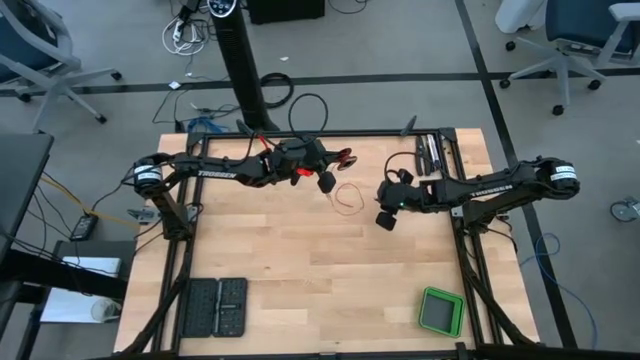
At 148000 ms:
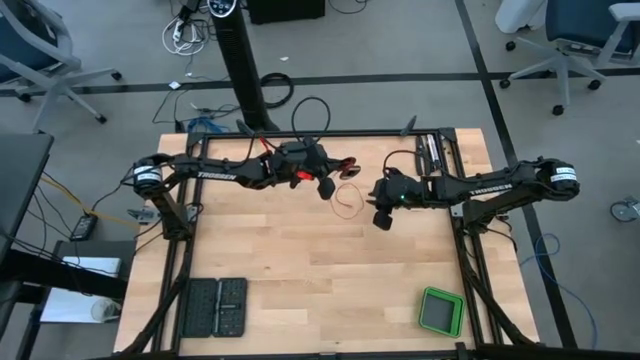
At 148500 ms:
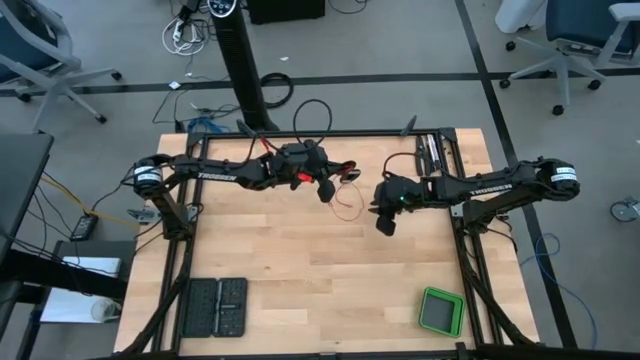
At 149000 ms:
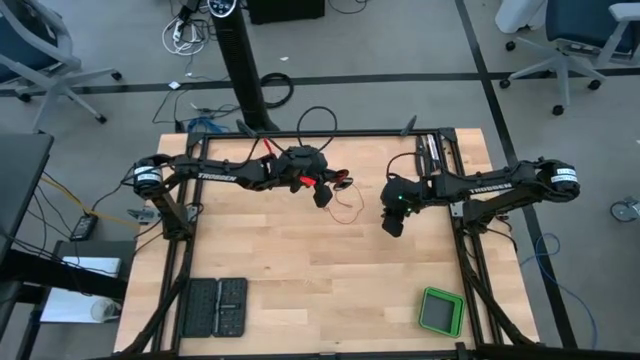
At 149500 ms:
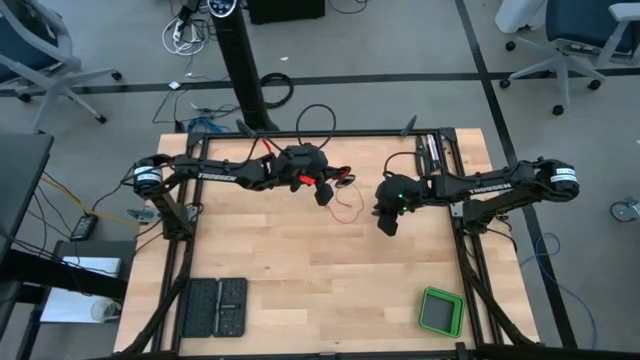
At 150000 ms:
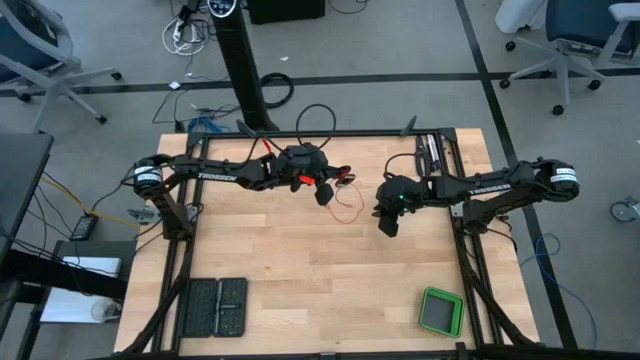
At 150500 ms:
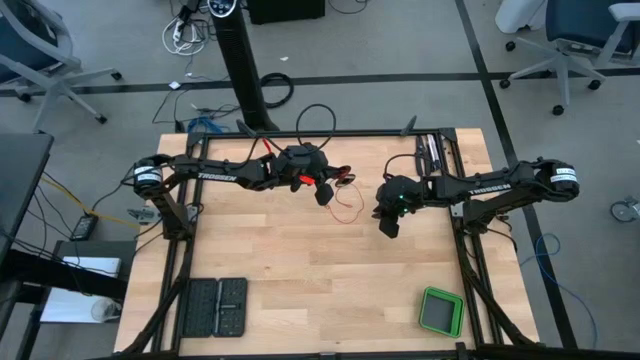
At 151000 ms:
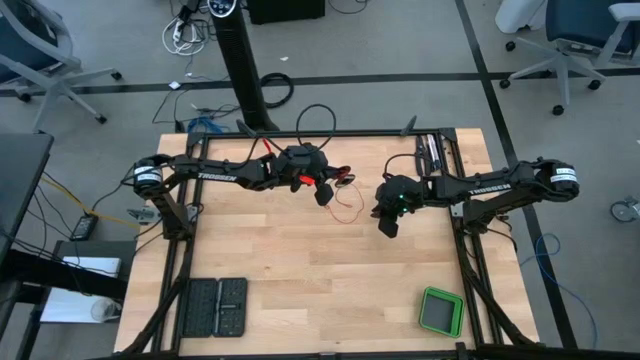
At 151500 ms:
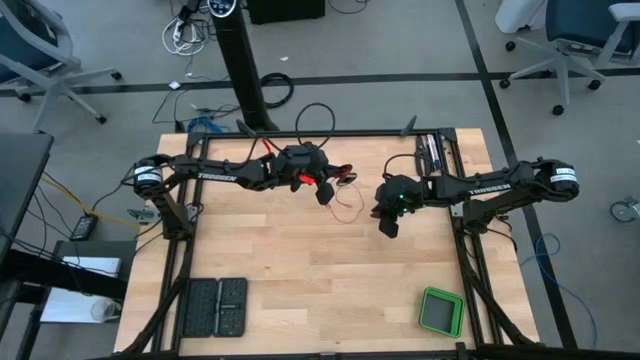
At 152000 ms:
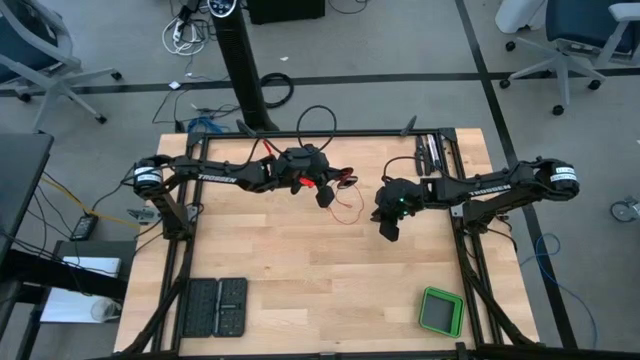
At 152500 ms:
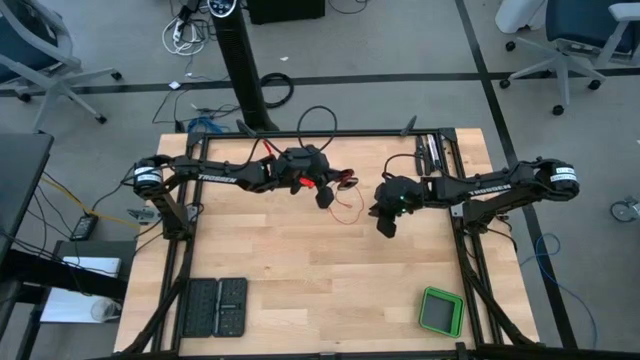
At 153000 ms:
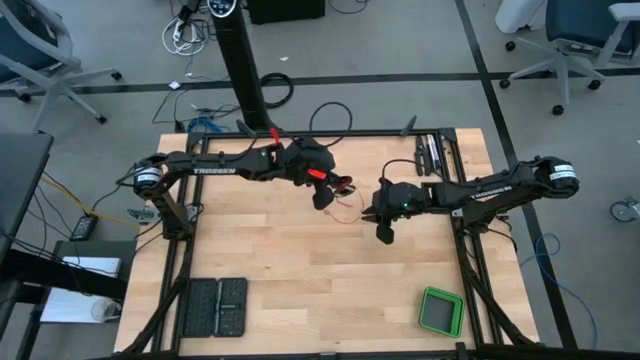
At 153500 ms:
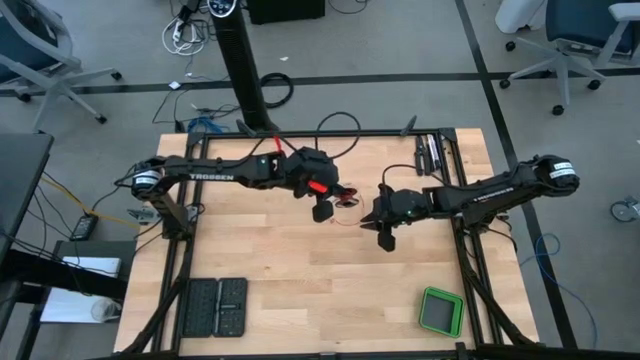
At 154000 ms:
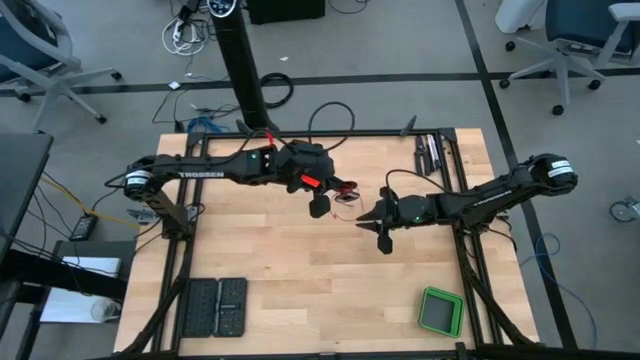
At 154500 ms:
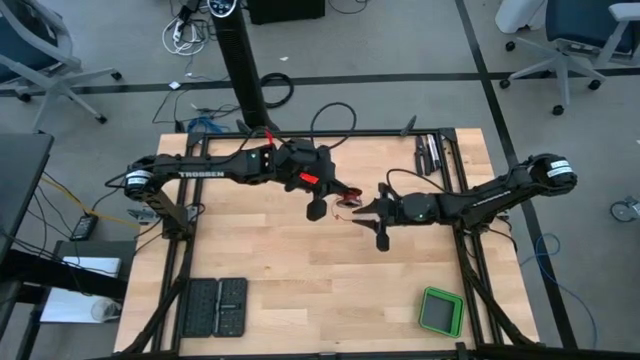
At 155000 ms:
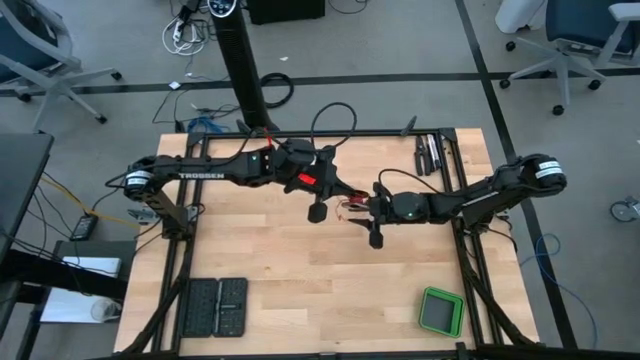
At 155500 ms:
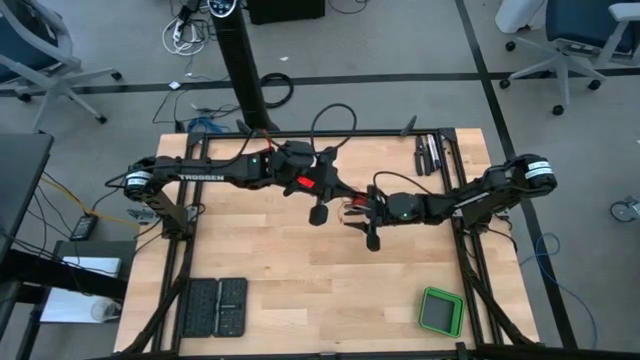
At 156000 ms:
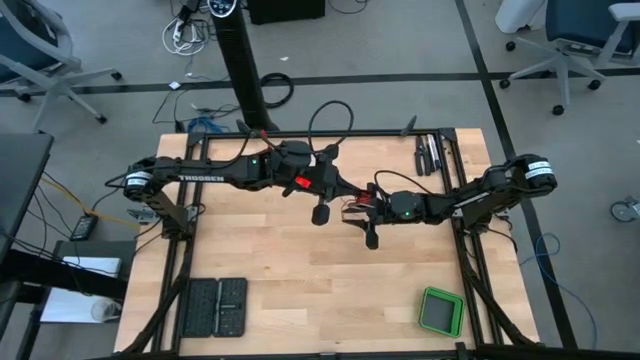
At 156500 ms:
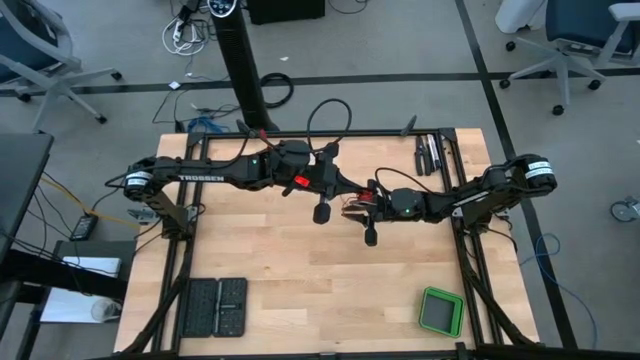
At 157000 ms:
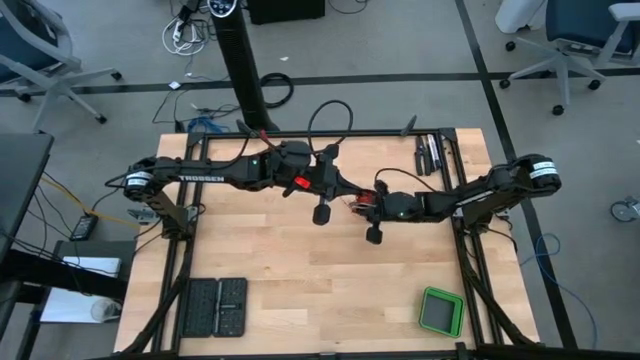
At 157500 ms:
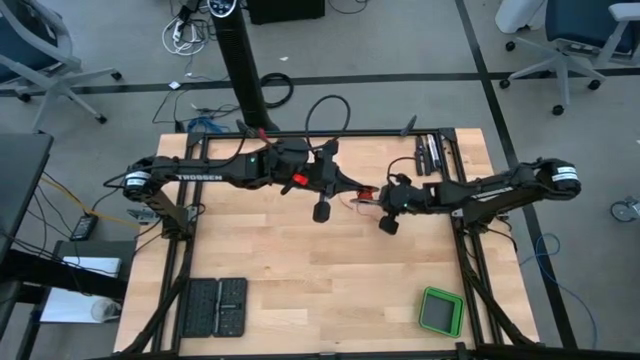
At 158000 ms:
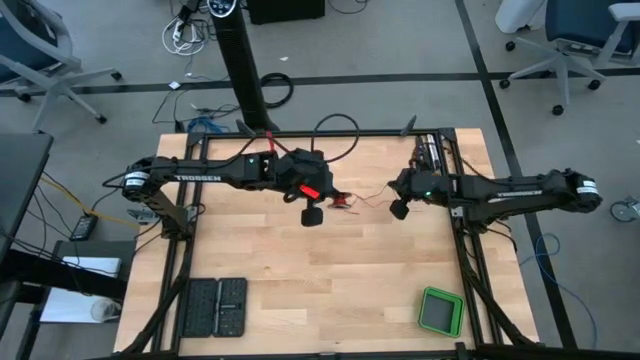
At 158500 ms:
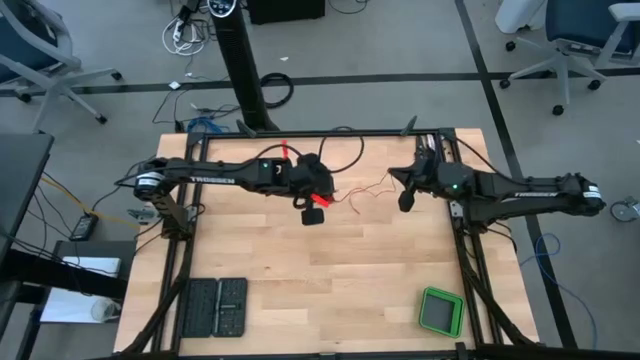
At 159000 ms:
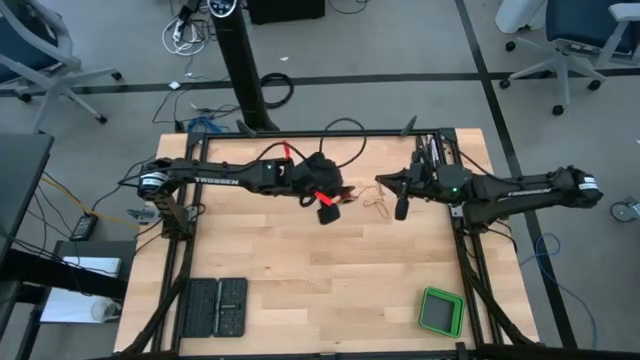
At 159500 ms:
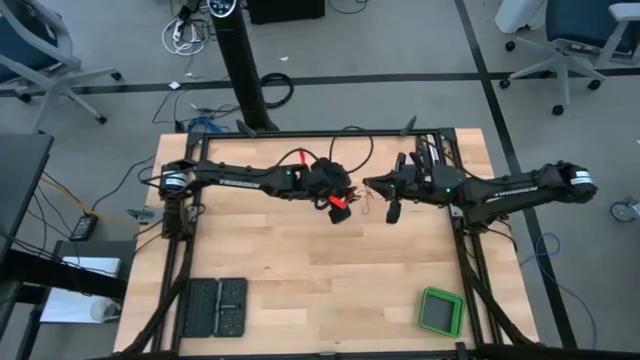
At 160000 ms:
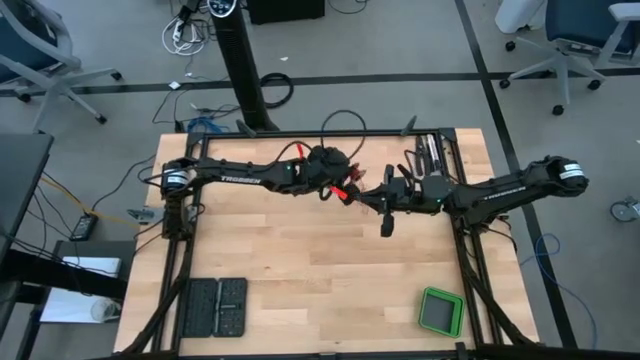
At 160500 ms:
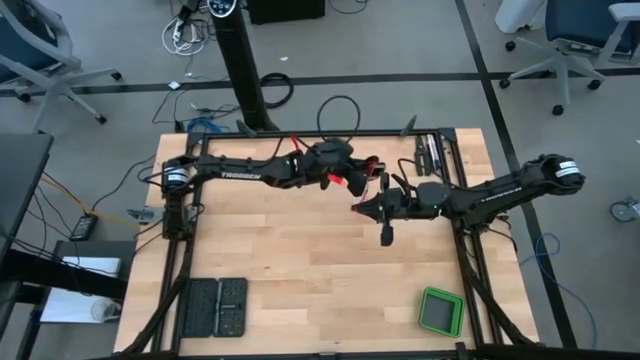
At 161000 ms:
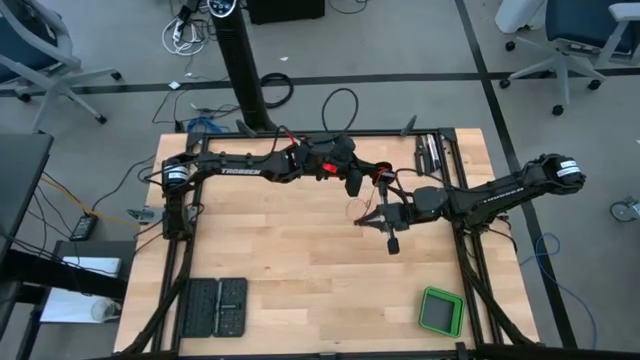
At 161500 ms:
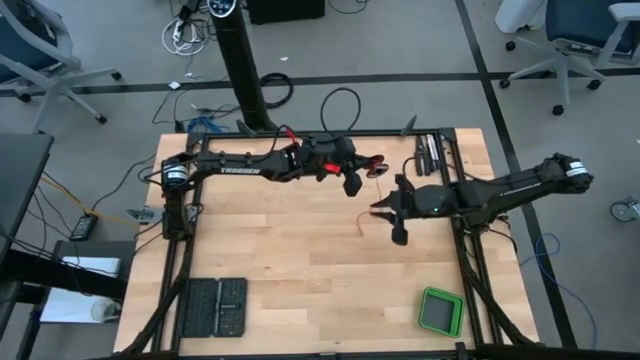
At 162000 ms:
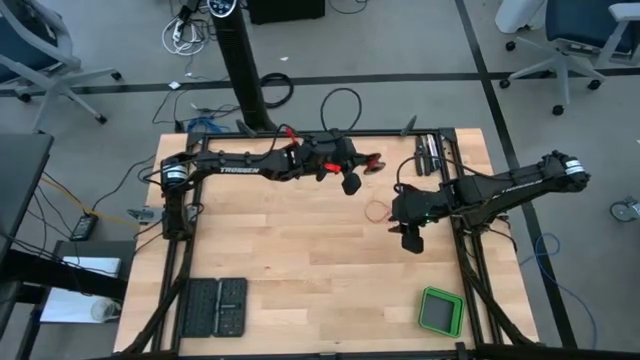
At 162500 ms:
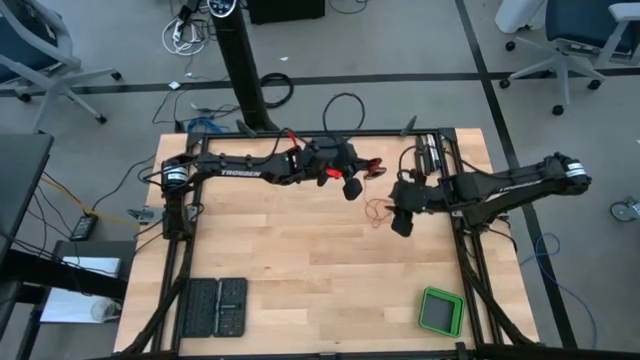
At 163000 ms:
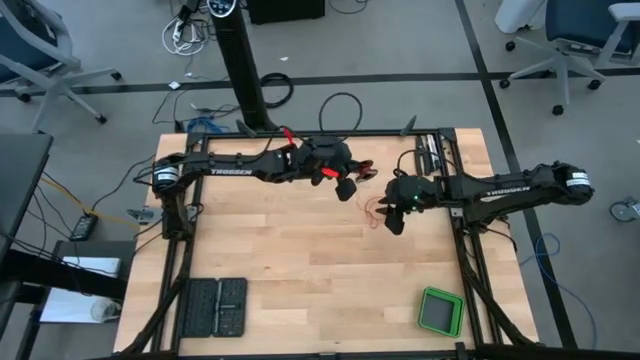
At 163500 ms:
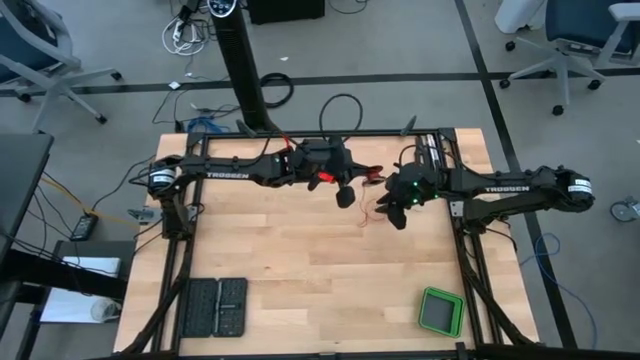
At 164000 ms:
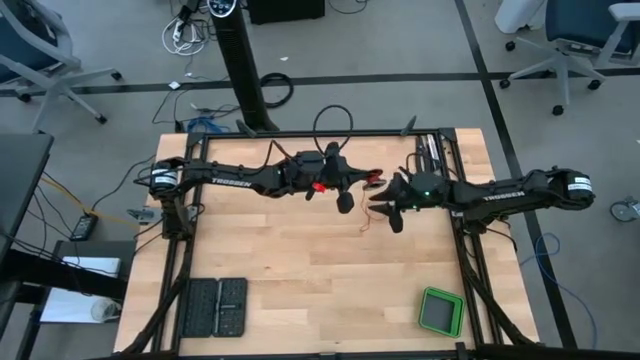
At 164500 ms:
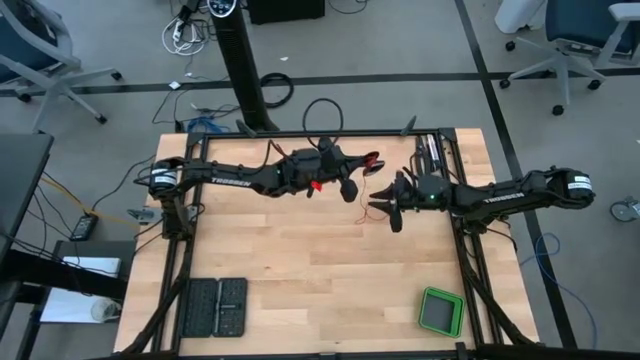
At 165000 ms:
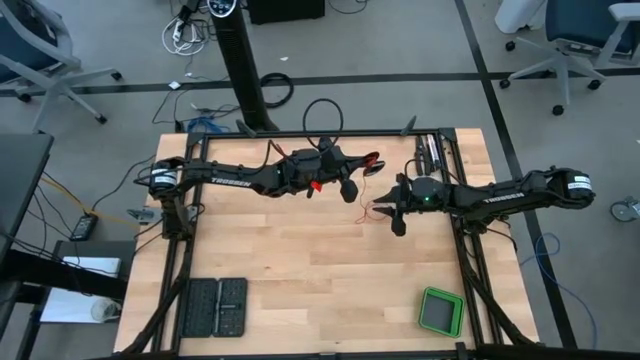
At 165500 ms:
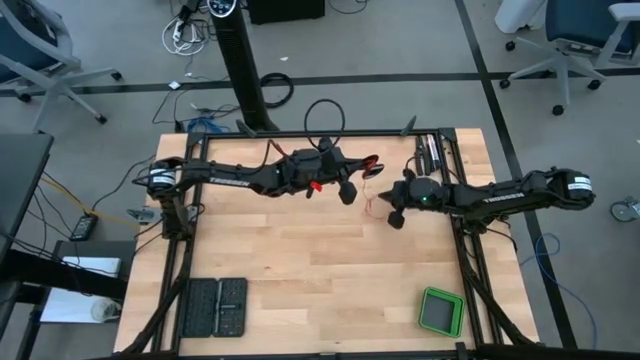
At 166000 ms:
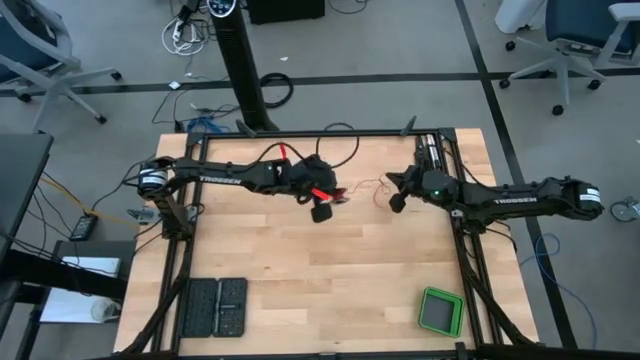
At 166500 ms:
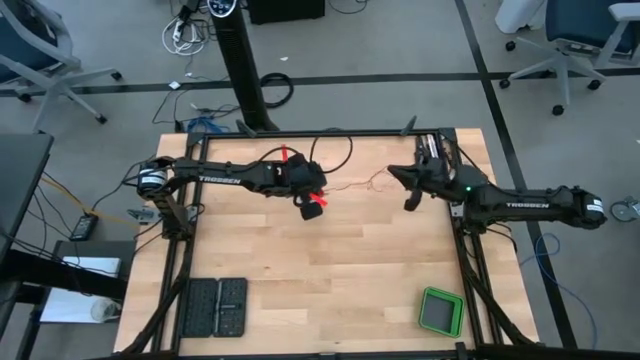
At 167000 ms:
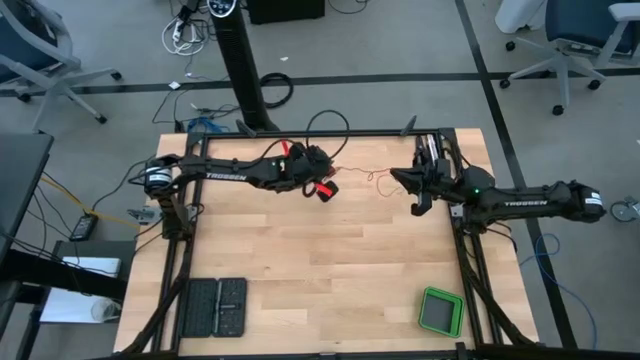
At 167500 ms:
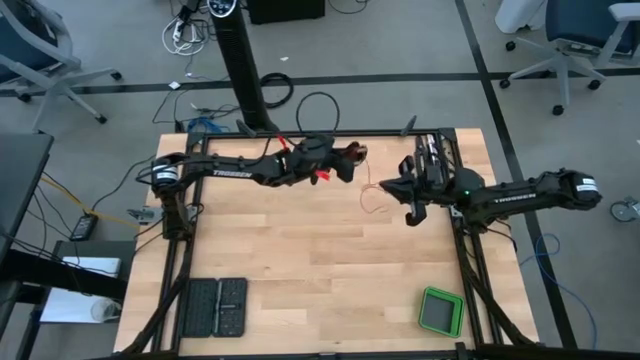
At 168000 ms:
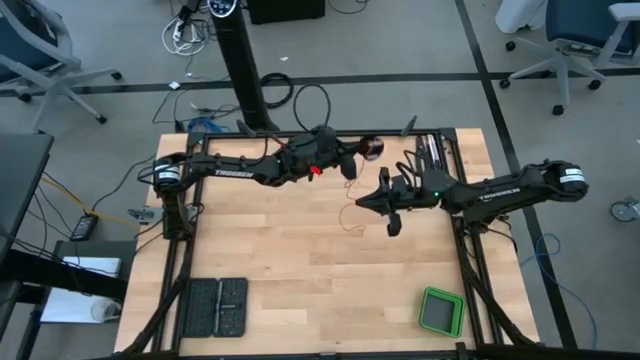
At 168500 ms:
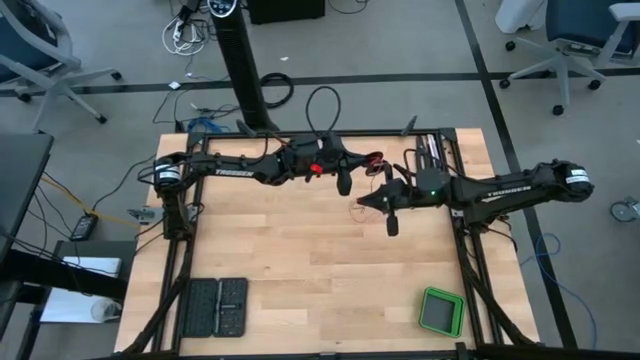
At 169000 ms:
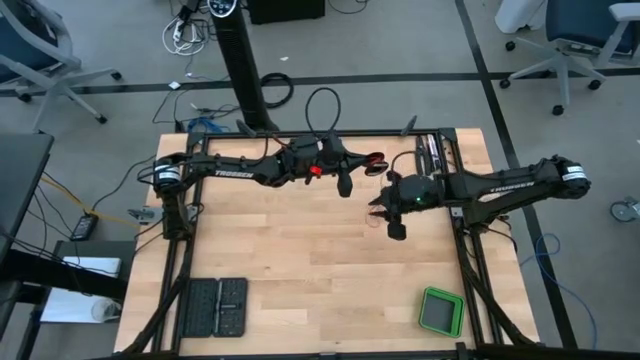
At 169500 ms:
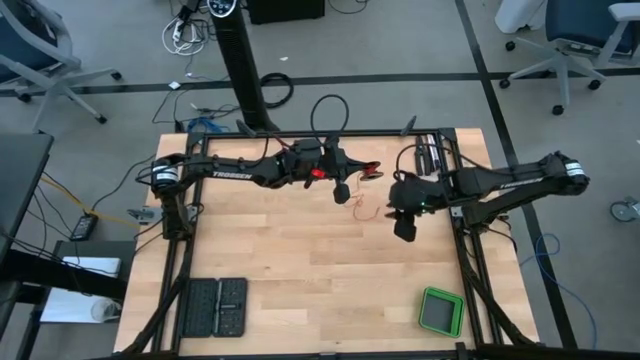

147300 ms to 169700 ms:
Task: Coil cords
Coil the red wire cable onto the black spool
